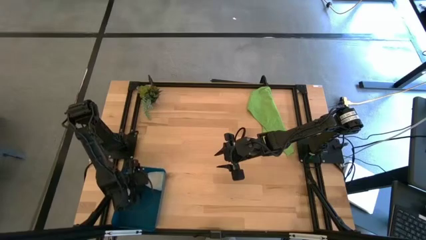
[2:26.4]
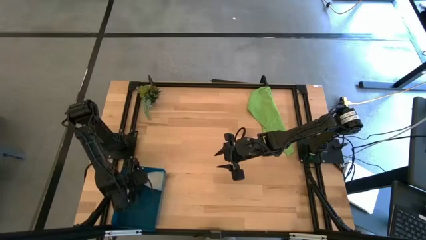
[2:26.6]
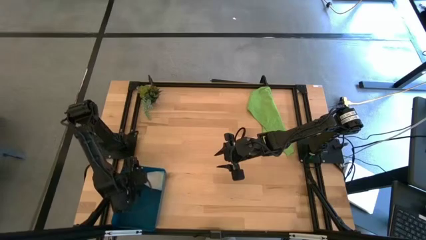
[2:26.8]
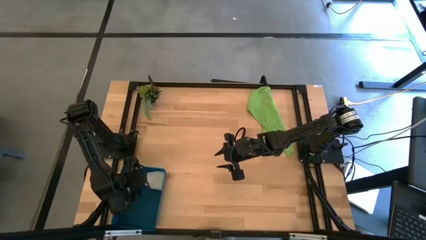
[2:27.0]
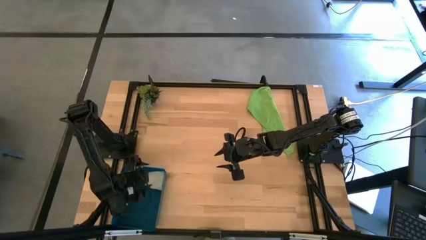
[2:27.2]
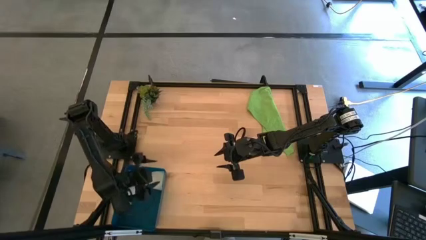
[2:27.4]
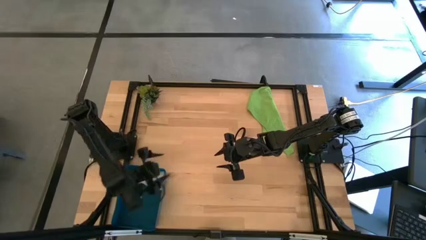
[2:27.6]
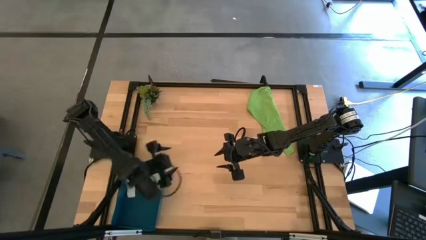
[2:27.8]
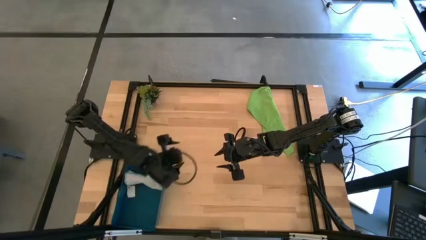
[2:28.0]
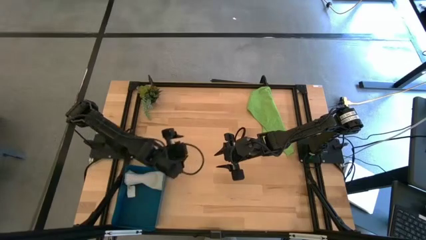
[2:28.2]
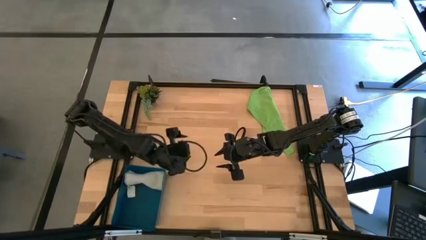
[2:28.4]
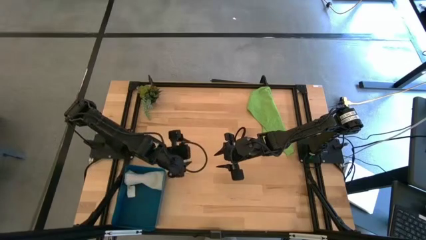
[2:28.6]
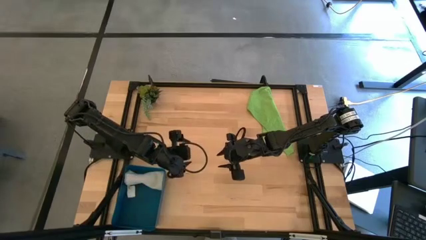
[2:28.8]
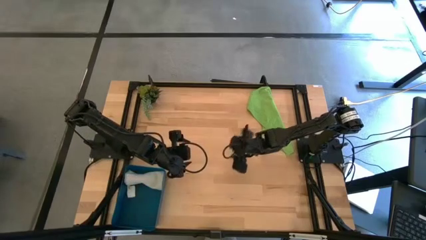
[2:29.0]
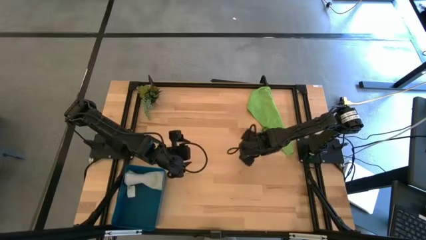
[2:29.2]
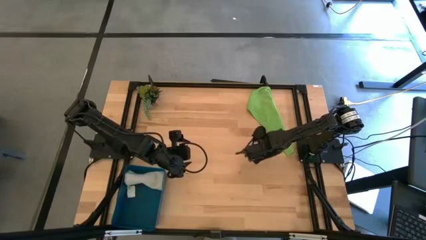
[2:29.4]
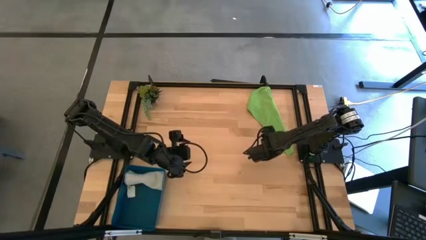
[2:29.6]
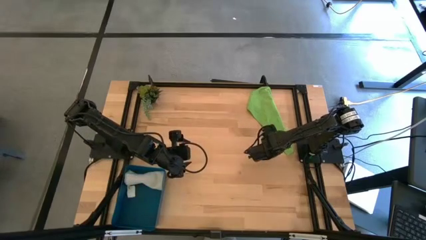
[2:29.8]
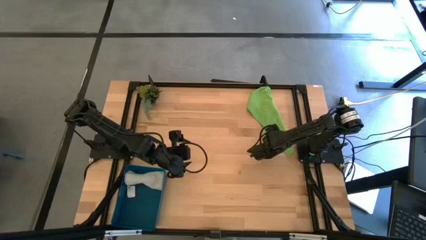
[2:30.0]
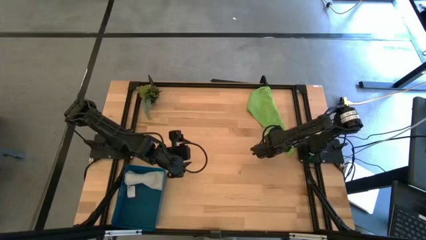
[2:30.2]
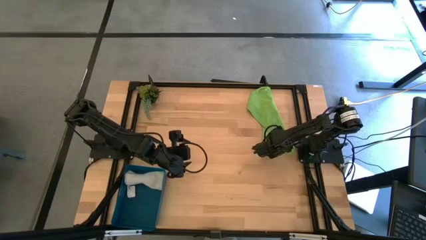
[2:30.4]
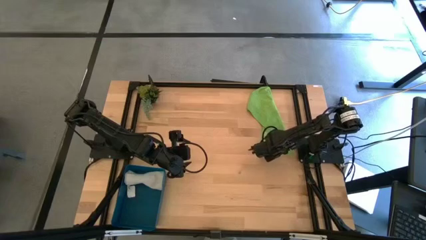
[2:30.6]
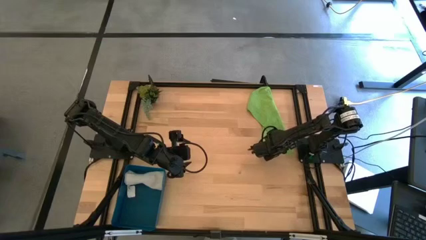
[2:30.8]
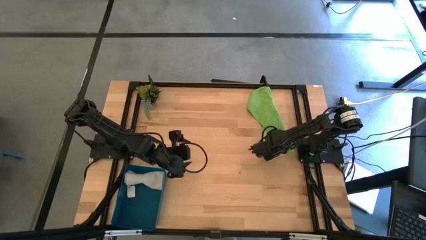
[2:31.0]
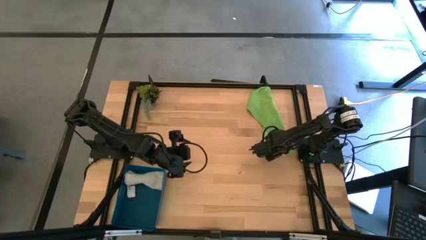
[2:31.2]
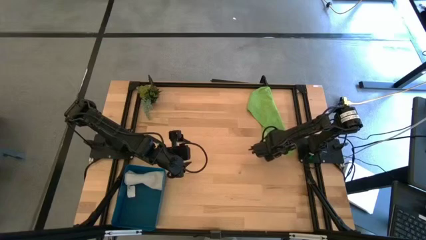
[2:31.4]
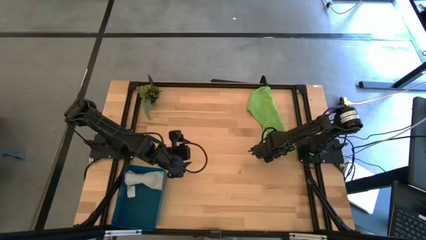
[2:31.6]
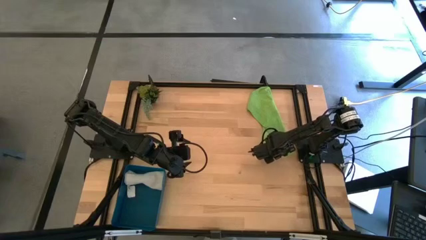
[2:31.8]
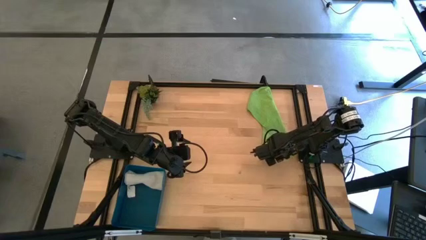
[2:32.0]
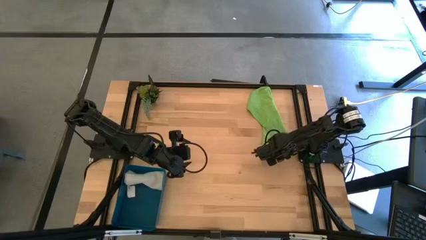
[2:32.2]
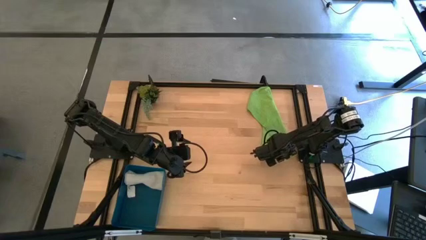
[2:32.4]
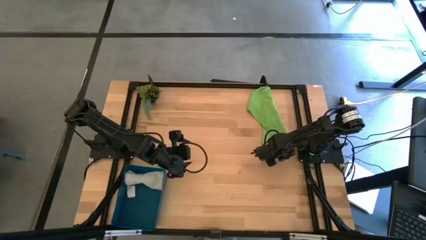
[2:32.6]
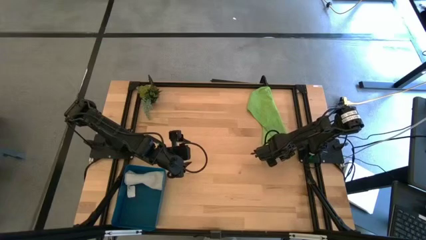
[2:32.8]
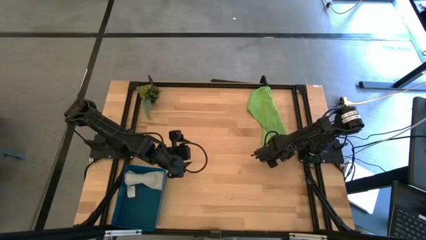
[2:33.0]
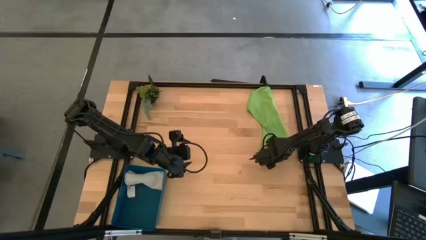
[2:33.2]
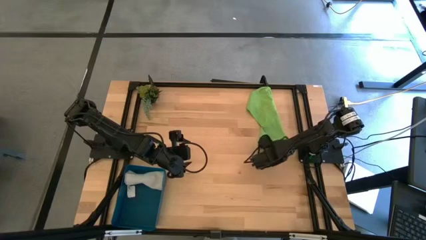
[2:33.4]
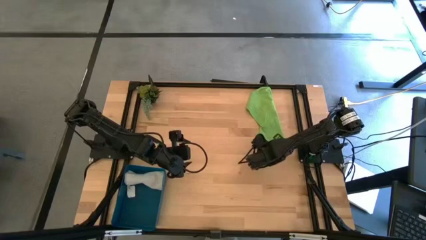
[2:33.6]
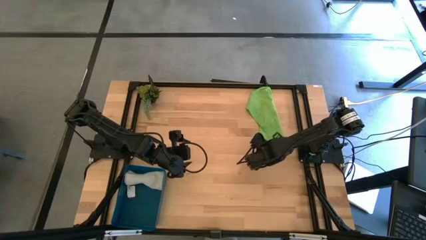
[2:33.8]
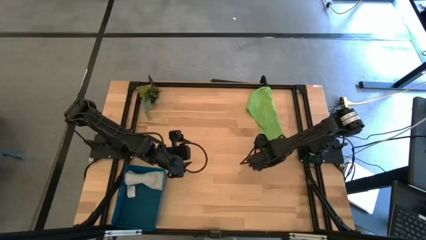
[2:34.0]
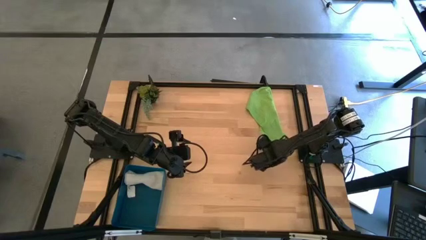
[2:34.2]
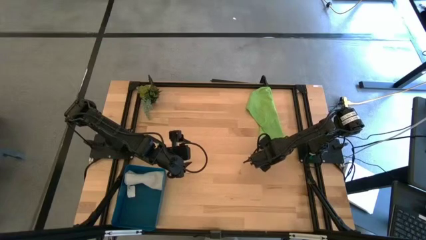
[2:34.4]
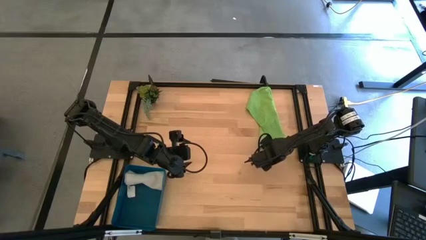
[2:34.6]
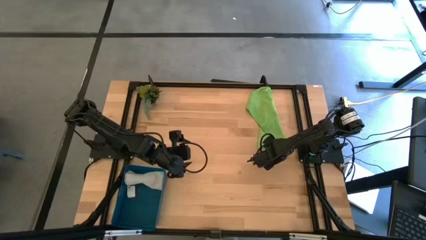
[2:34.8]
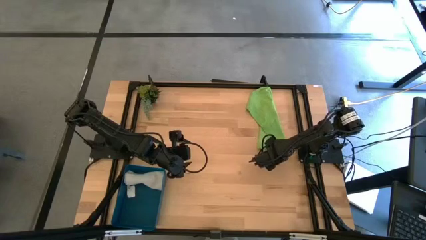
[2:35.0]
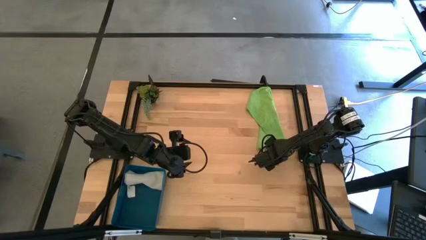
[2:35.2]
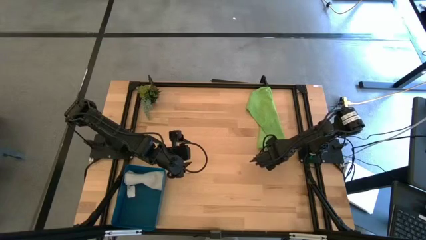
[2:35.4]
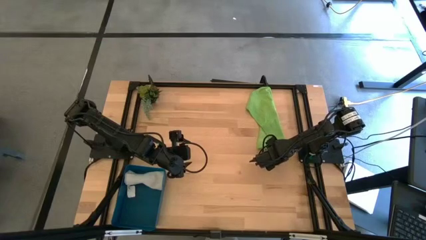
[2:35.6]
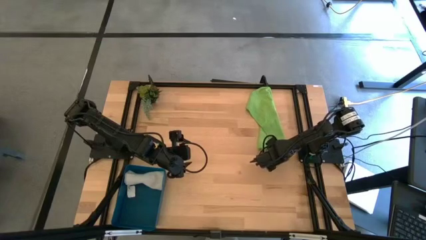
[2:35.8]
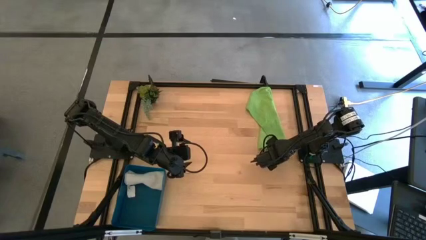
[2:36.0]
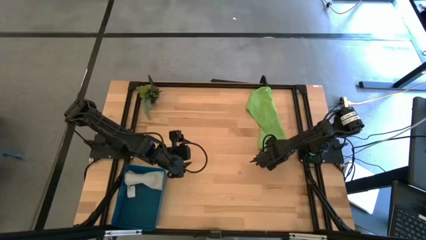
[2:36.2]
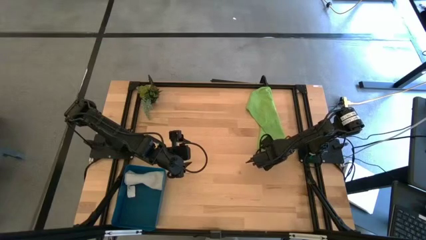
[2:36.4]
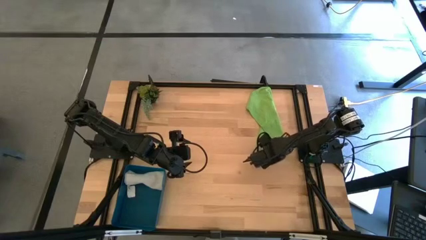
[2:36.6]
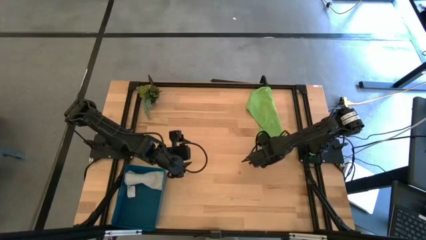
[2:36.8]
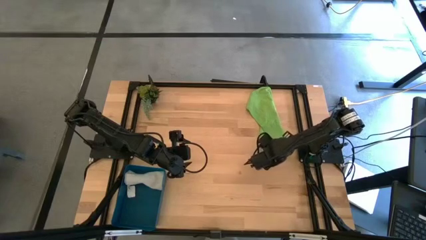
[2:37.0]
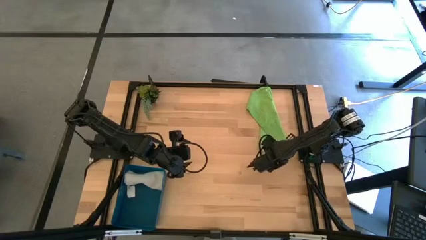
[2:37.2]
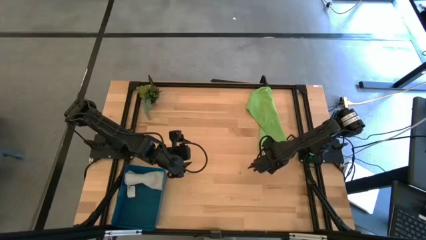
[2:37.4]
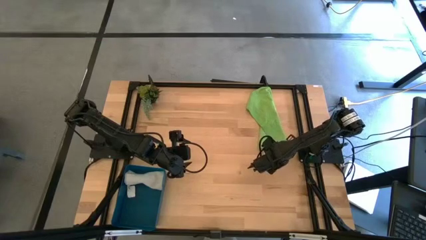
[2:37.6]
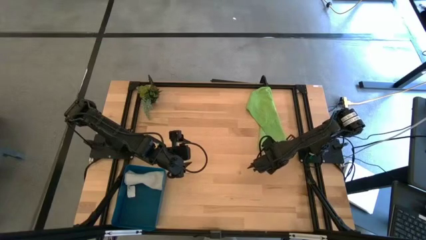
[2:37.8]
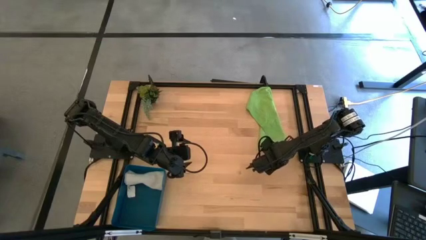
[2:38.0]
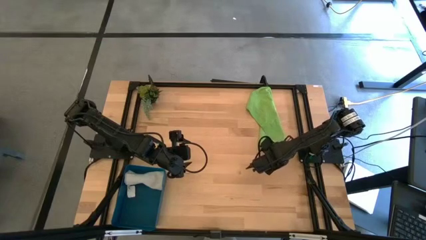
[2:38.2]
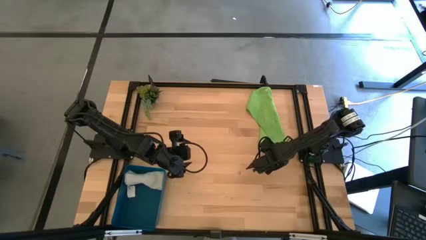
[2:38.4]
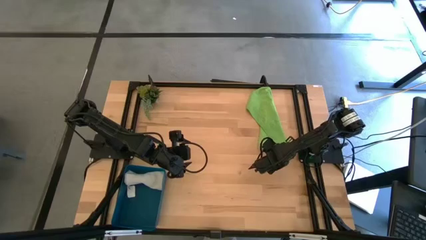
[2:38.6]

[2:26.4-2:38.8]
Task: Roll microfiber towels into tight, uniform cylinder then place into a basket
Roll the green towel

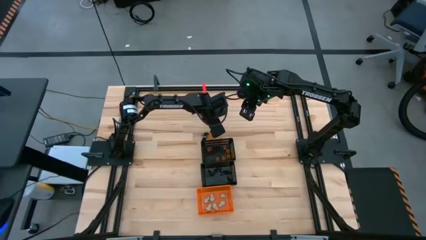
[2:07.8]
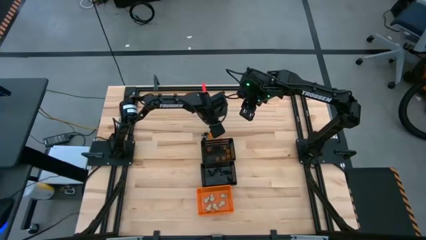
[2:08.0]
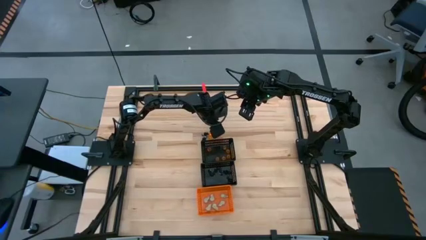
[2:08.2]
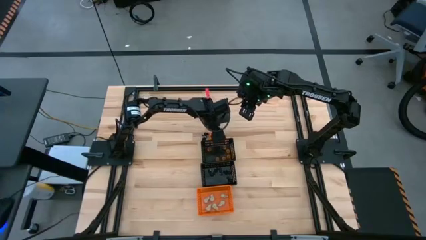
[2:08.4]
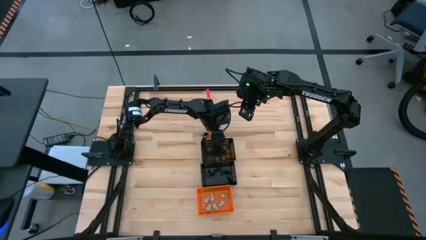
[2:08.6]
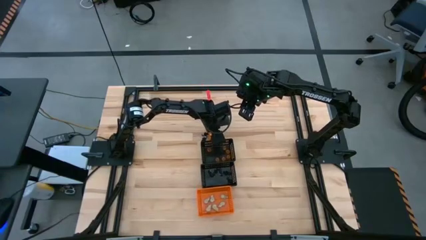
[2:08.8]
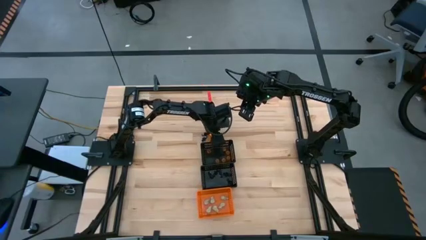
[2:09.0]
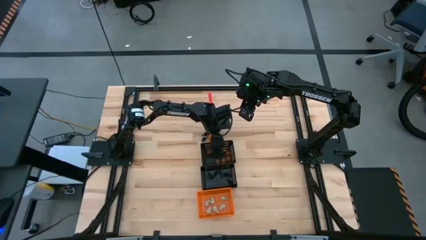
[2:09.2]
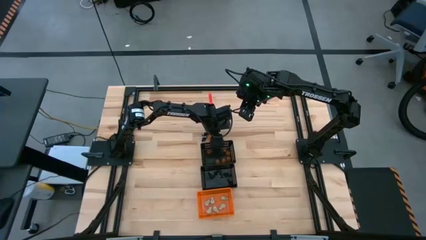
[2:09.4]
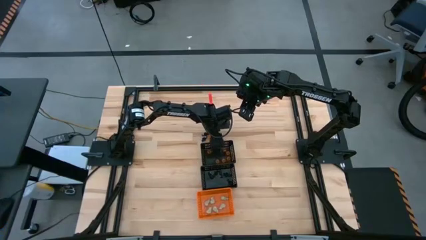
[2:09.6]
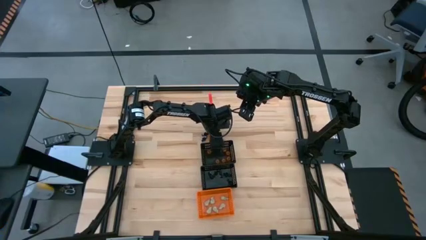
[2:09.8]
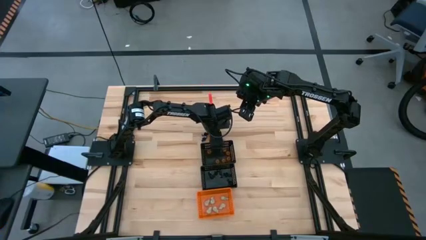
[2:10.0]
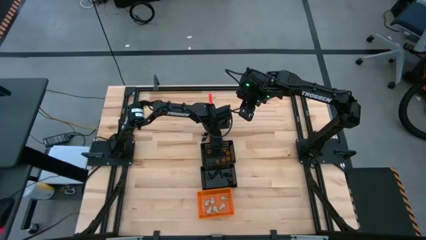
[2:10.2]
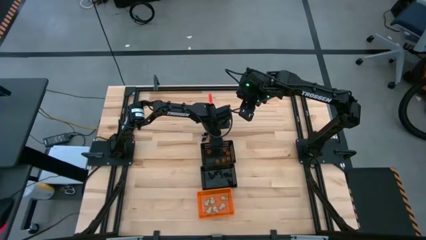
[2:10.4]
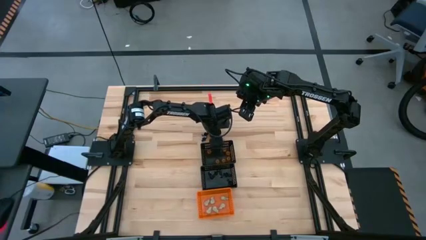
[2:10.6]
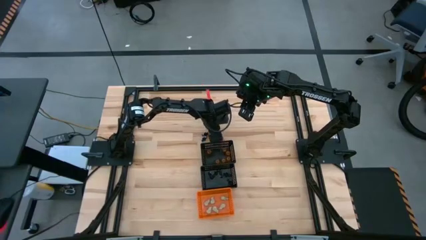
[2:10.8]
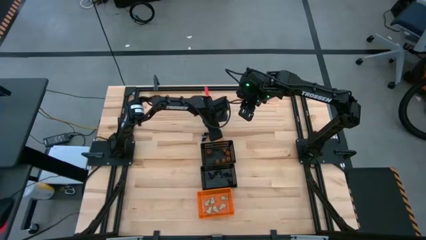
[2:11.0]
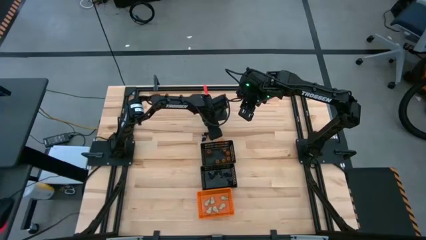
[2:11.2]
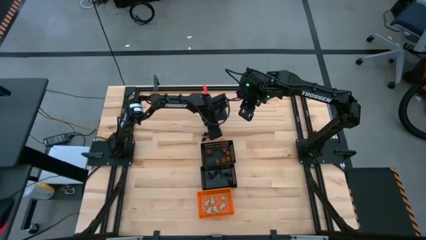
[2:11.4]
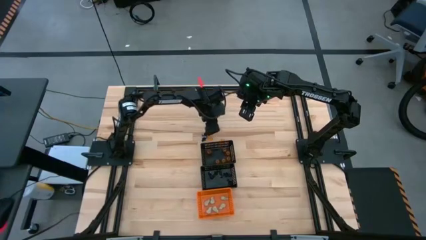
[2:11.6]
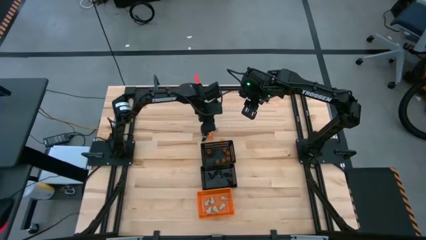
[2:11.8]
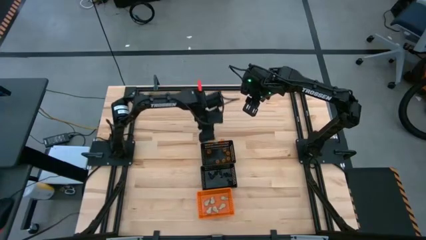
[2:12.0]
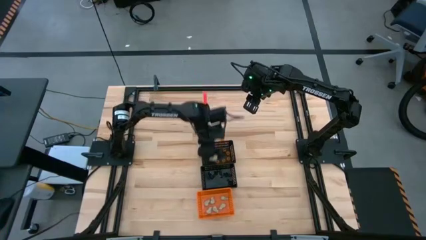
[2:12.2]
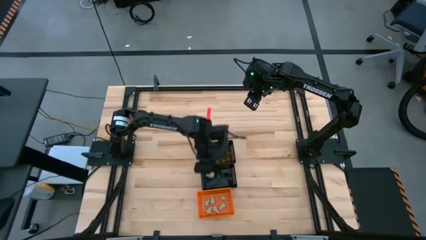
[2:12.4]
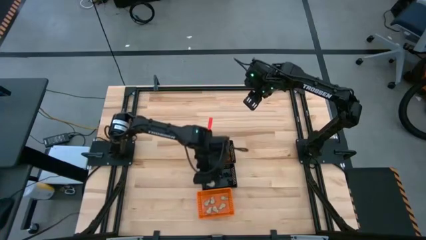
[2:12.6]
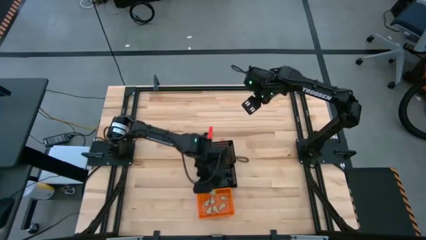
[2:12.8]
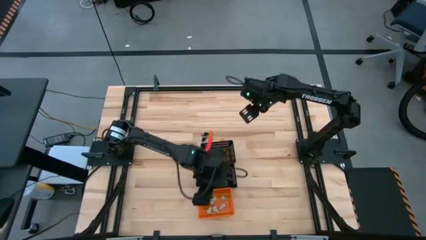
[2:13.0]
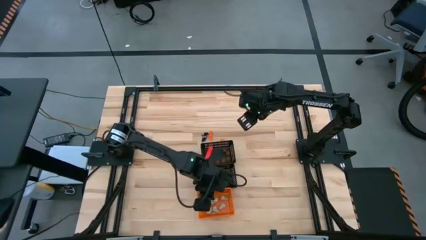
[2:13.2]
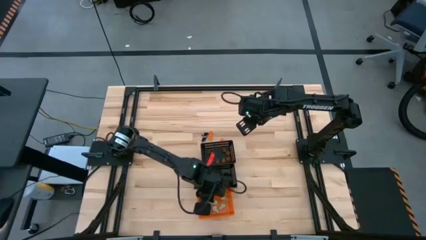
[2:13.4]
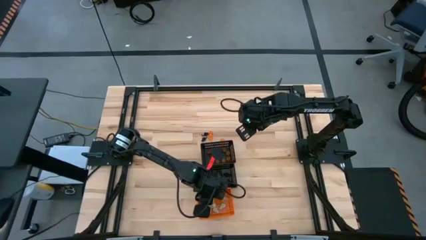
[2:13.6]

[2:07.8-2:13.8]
Task: Sort Halloween decoration
Put the white skull toy into the orange bin
